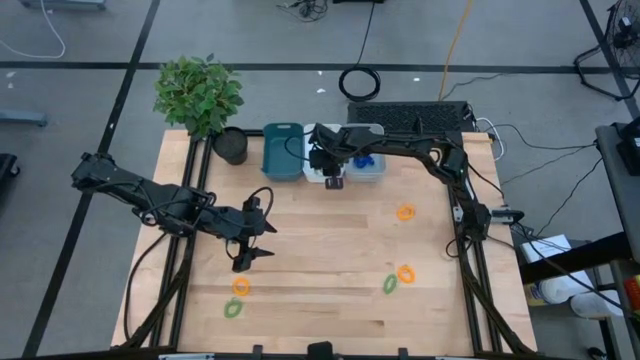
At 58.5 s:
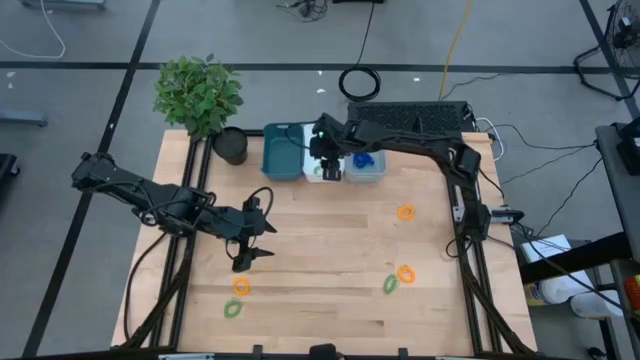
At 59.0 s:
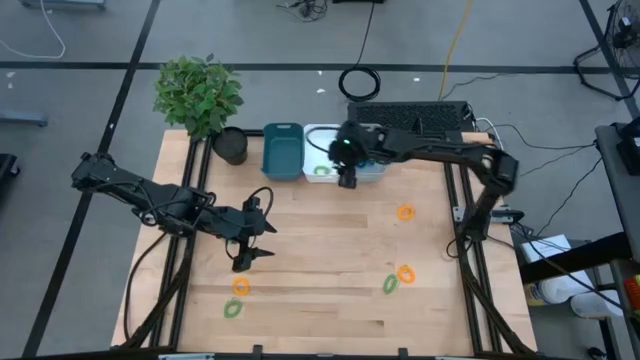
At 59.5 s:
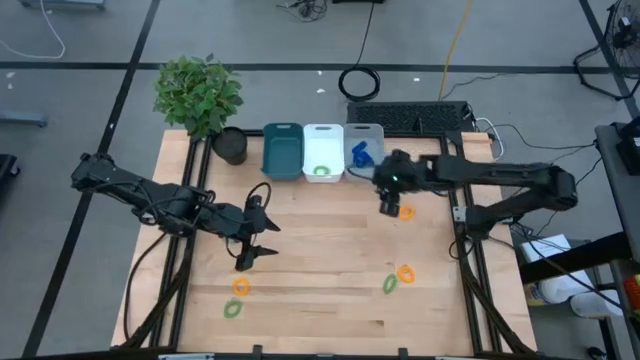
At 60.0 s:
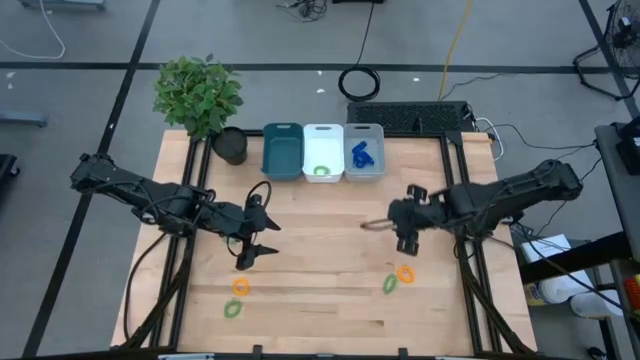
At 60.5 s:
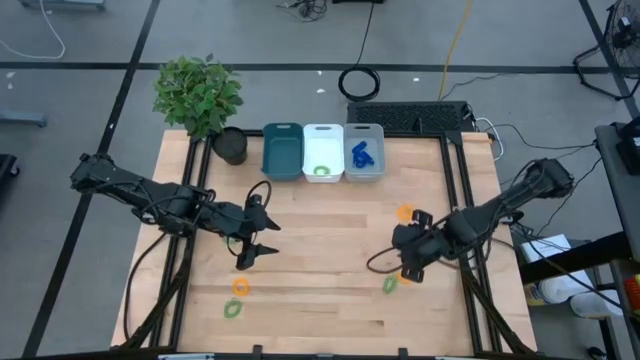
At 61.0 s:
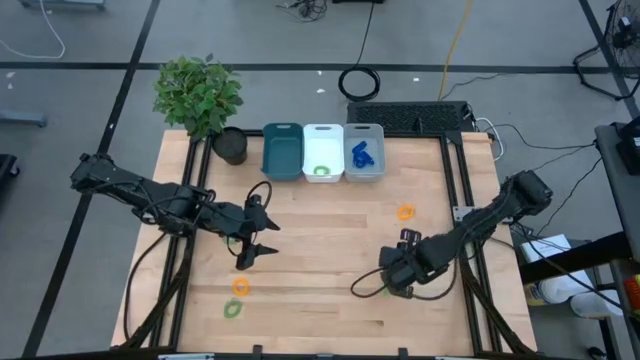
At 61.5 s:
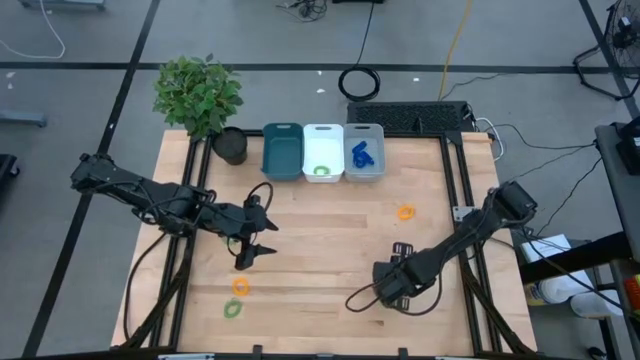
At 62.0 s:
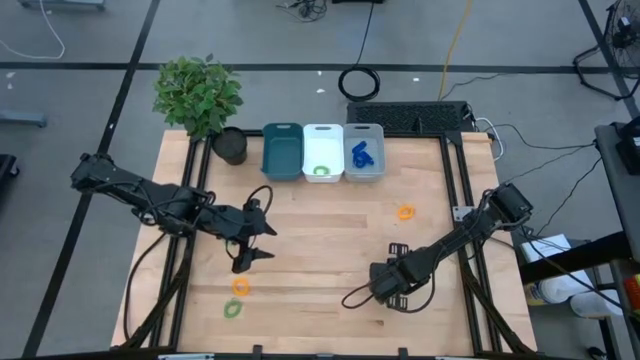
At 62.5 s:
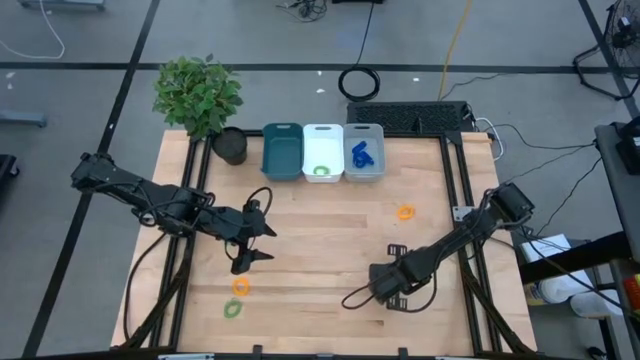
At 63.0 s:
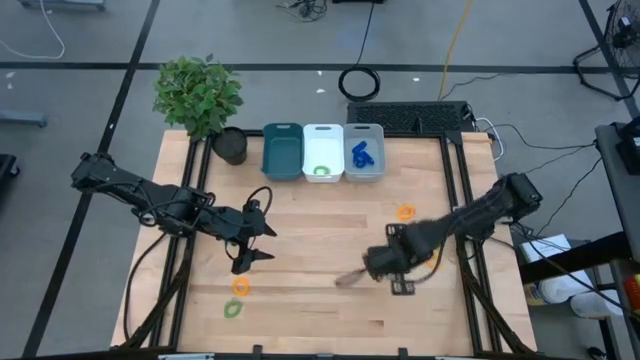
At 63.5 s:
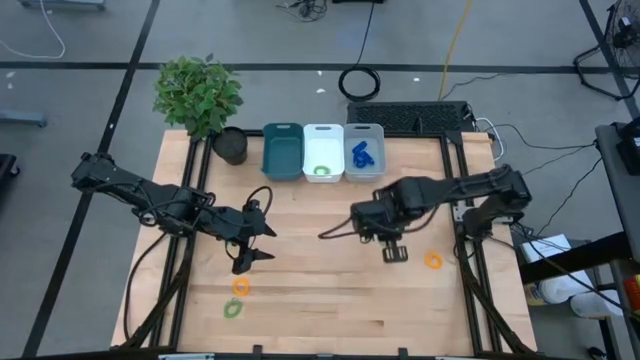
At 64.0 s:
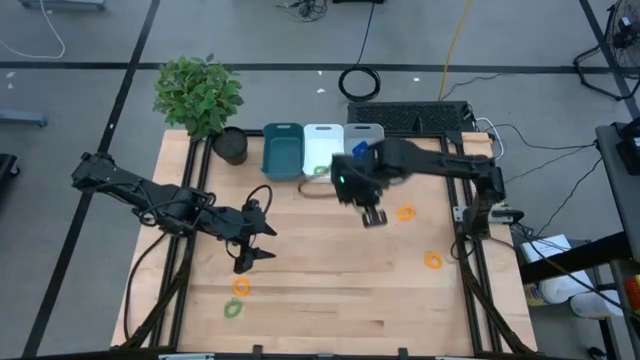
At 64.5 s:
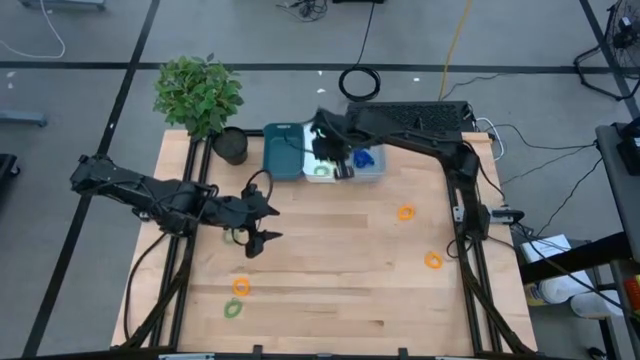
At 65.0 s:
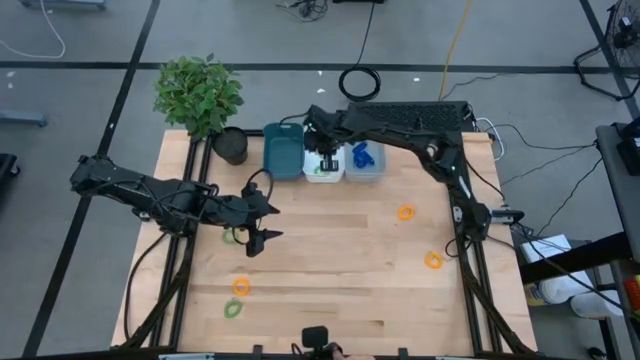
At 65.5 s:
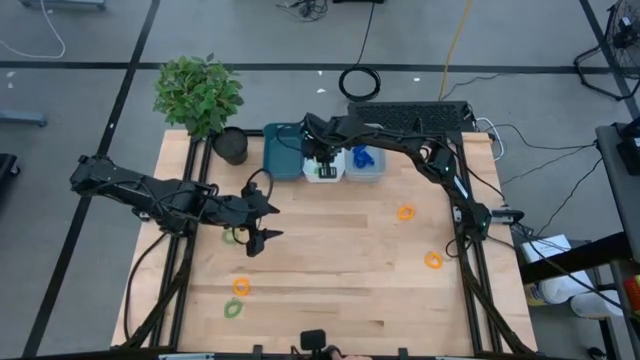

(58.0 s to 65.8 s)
Task: Sort spring keychains
Put the green spring keychain in the white bin

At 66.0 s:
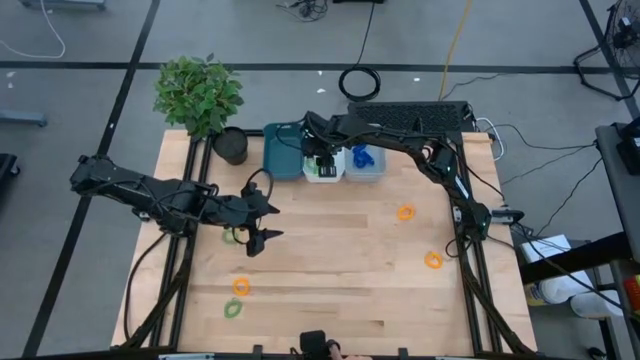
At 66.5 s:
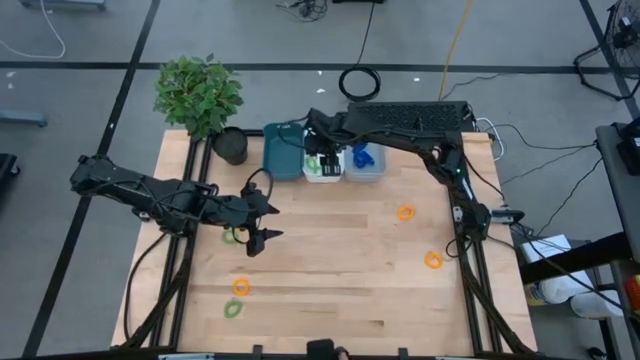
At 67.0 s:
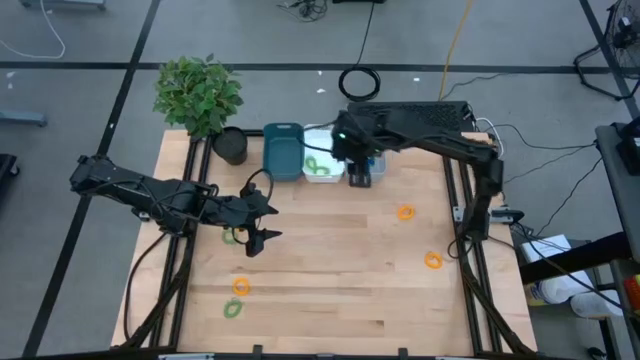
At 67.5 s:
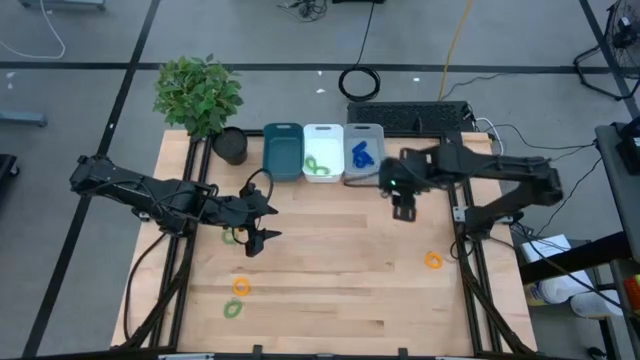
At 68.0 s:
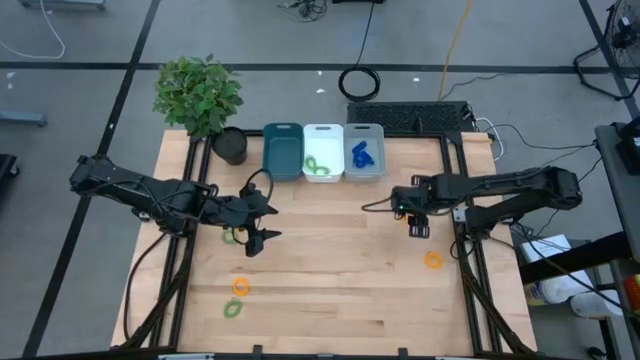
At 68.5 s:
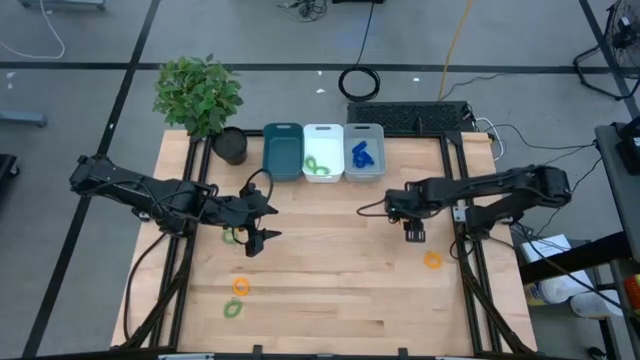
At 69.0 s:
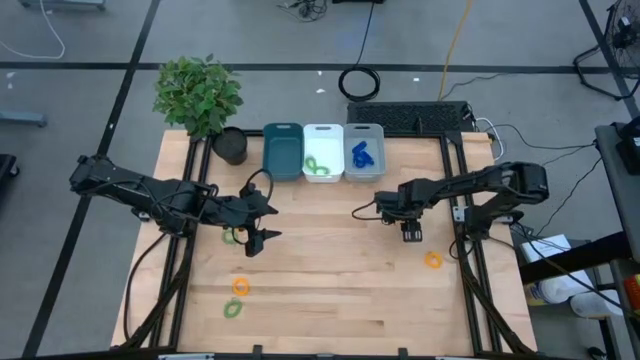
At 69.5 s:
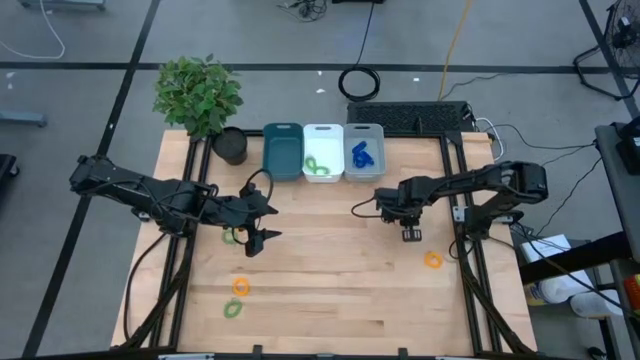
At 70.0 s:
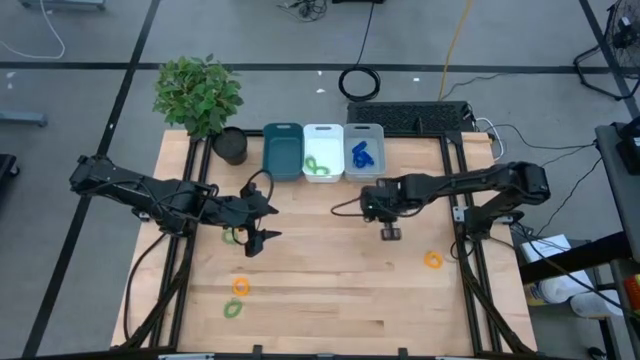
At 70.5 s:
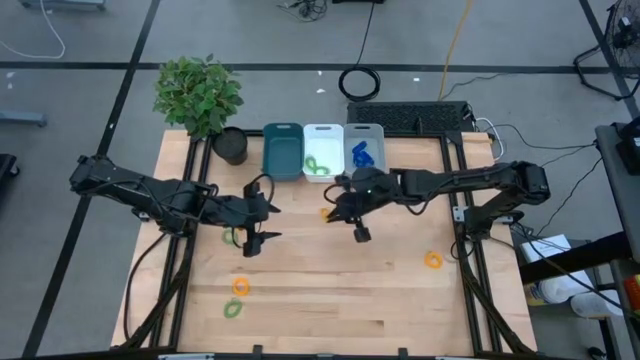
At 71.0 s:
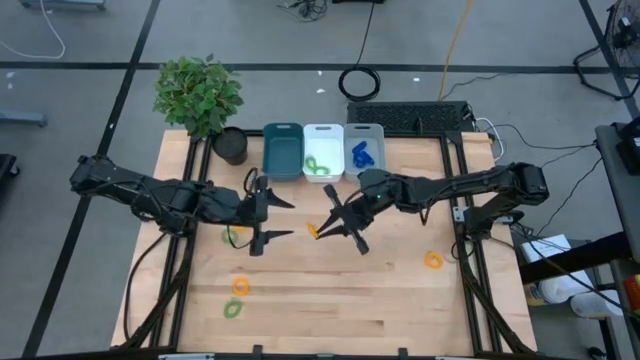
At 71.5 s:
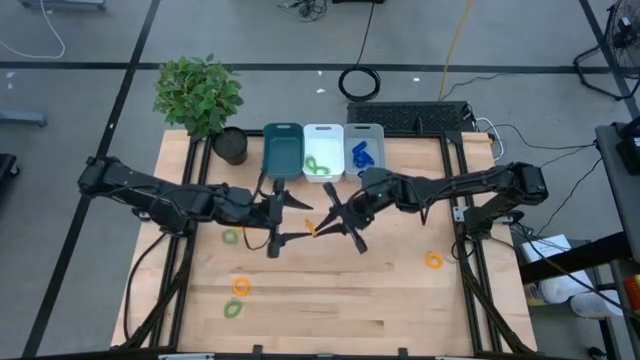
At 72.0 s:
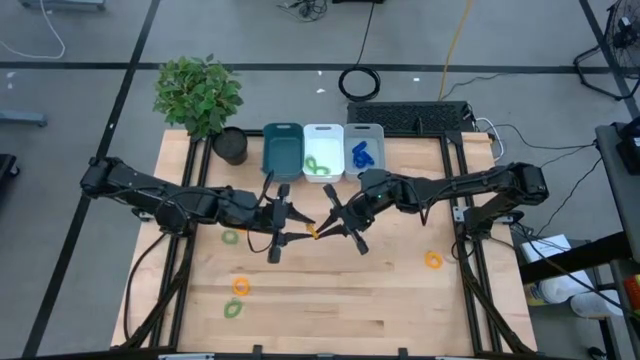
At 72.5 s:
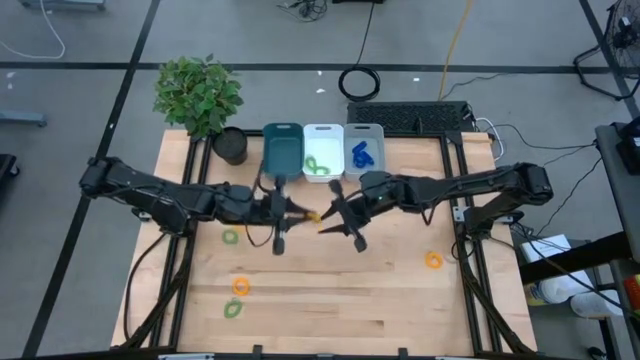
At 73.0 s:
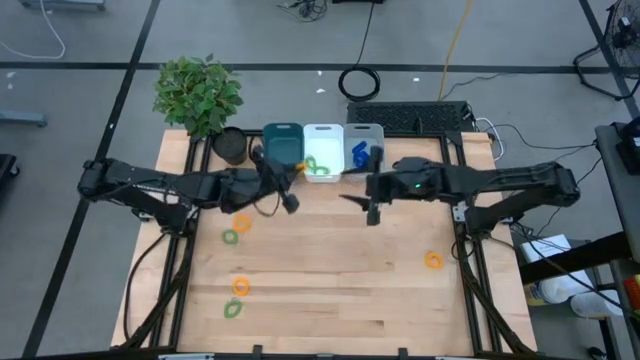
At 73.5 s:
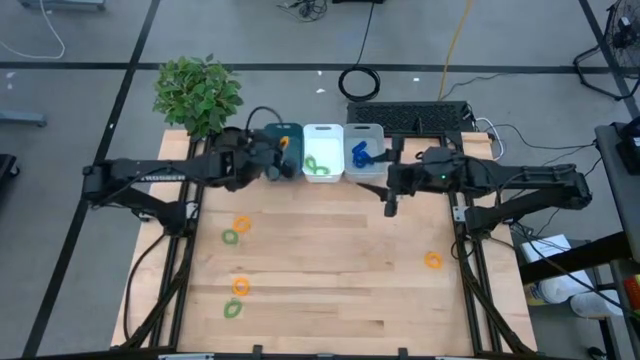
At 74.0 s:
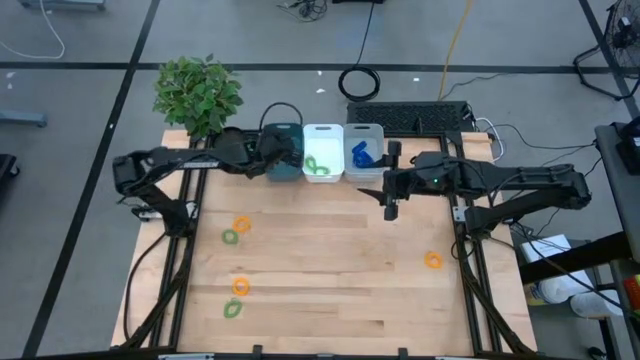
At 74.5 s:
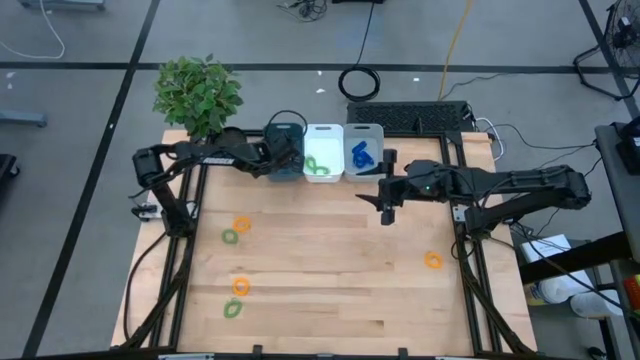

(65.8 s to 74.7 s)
Put the yellow spring keychain in the blue bin

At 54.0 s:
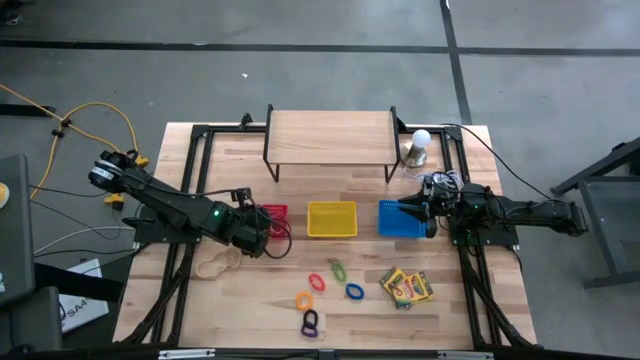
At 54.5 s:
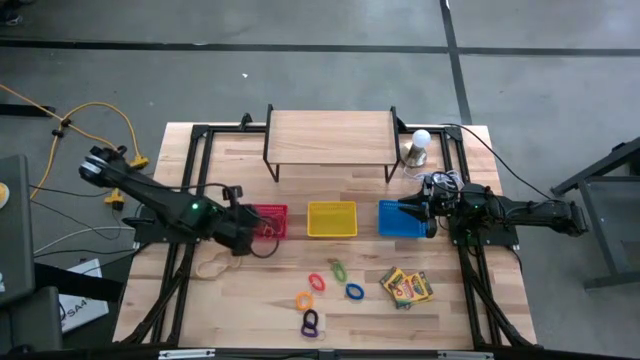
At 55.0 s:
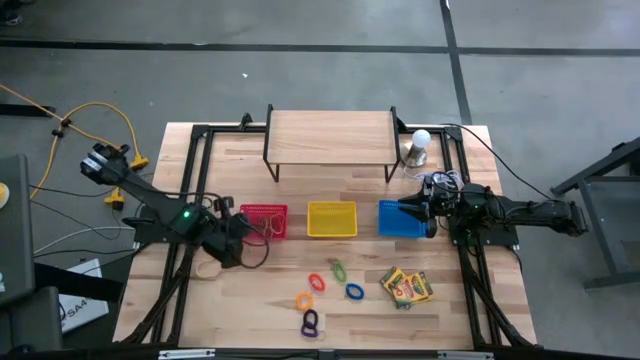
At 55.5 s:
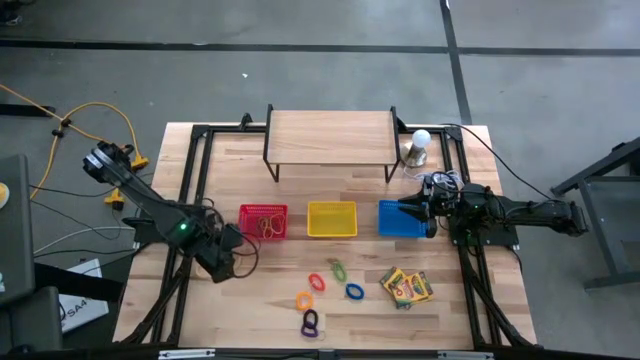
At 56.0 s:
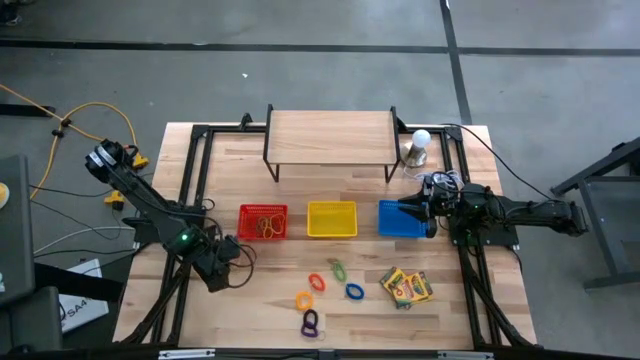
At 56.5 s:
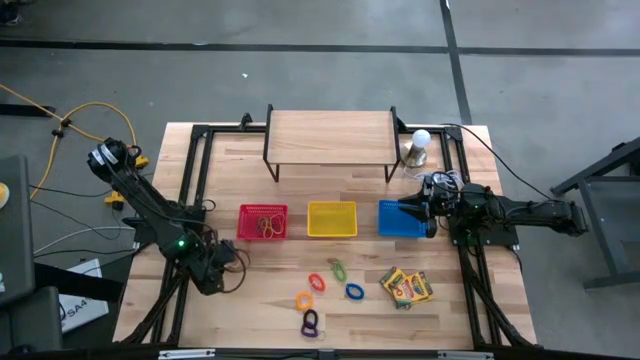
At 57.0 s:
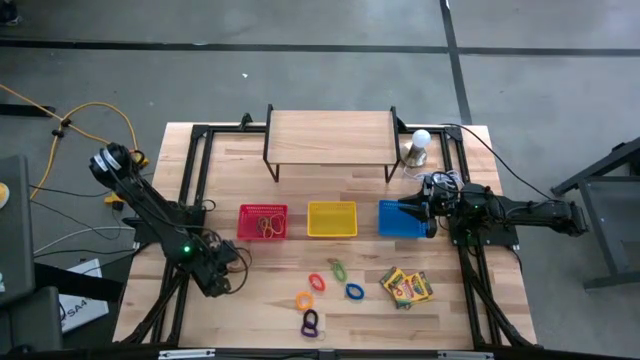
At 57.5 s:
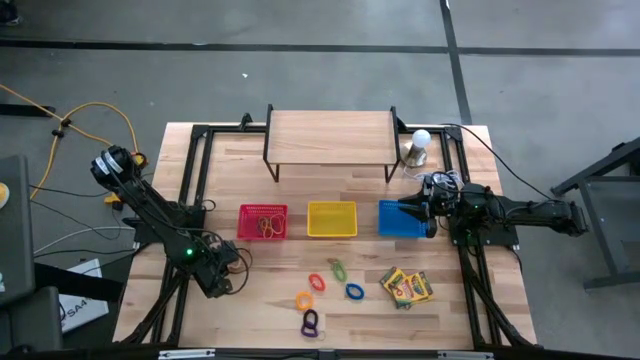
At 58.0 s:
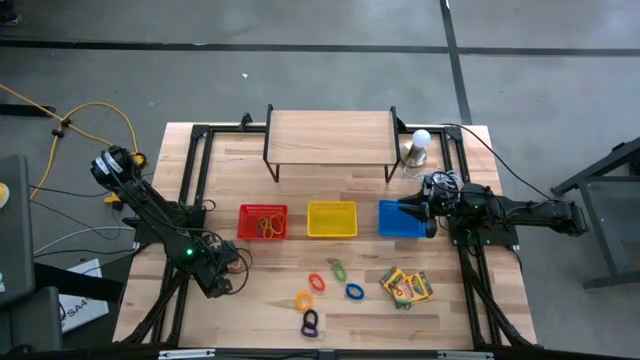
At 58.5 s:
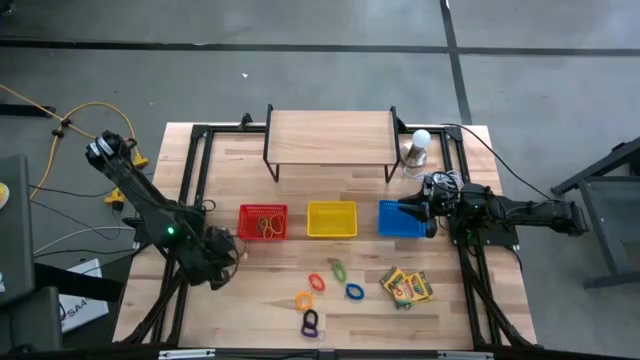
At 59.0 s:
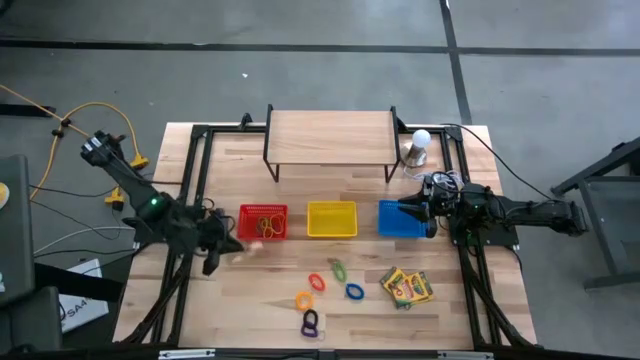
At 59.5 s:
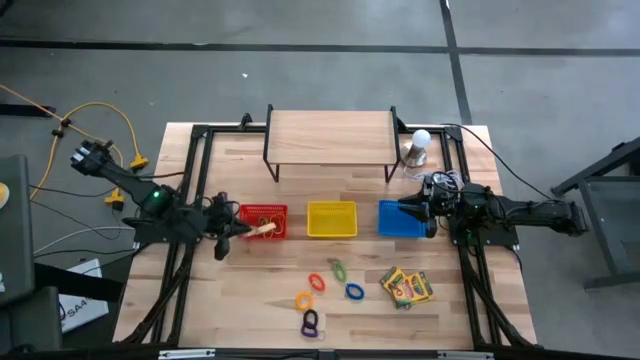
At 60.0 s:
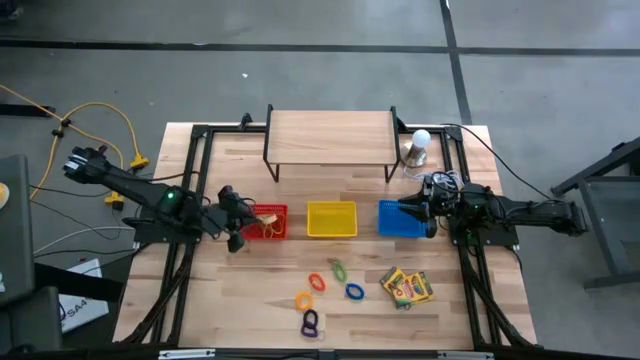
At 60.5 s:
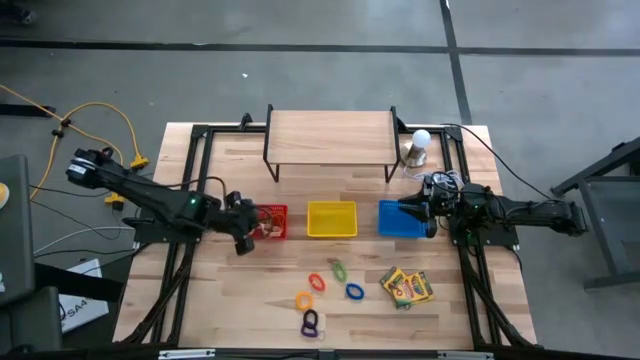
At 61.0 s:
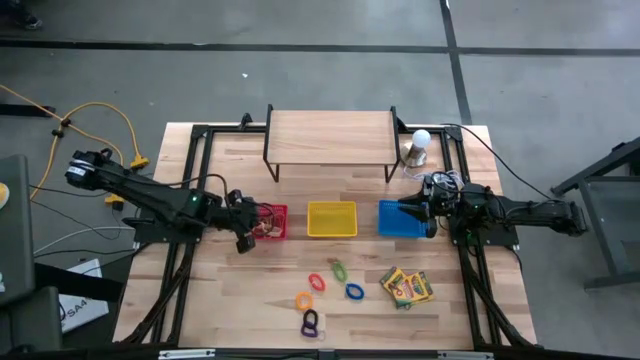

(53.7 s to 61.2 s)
Task: Pick & Place Office Desk Supplies
Put the white rubber band into the red bin
